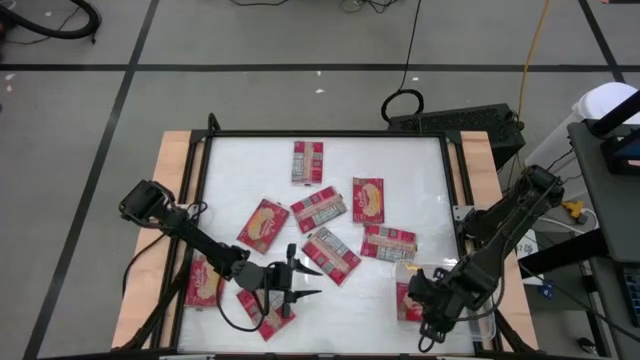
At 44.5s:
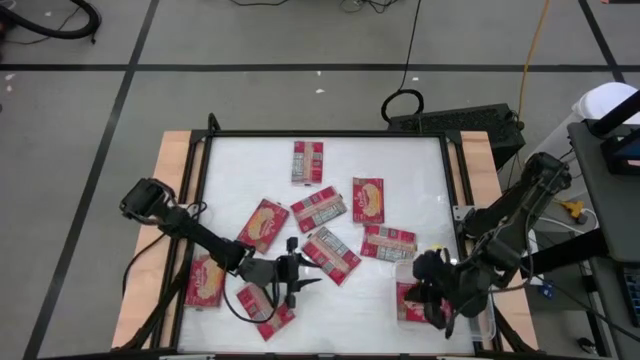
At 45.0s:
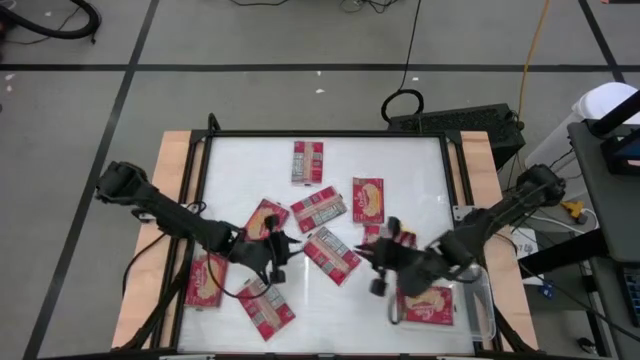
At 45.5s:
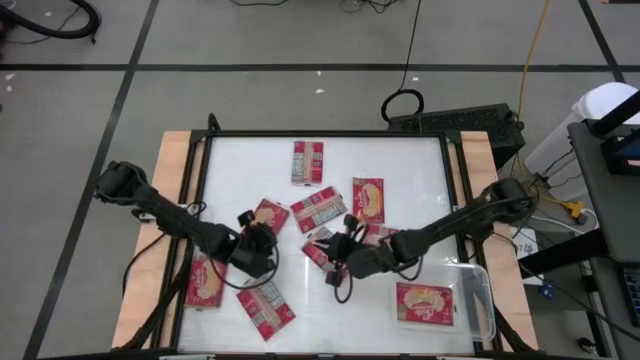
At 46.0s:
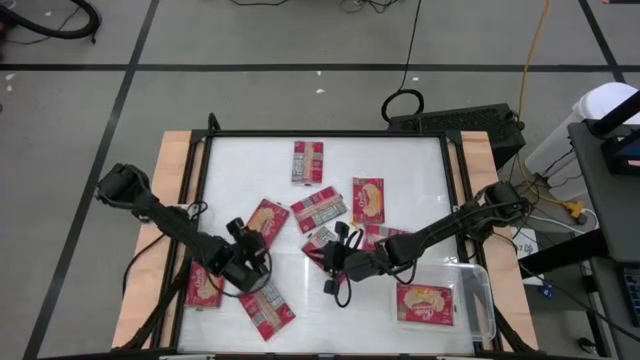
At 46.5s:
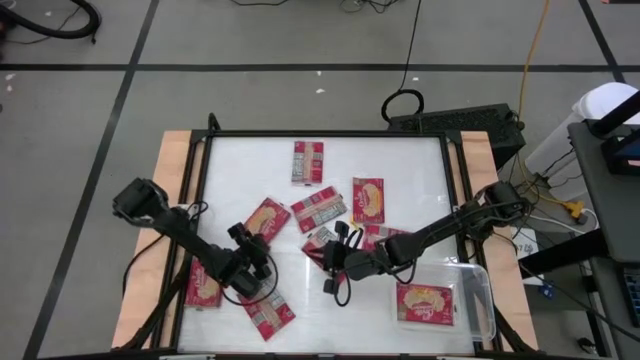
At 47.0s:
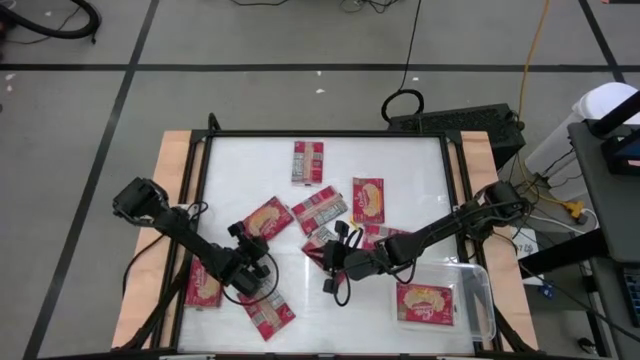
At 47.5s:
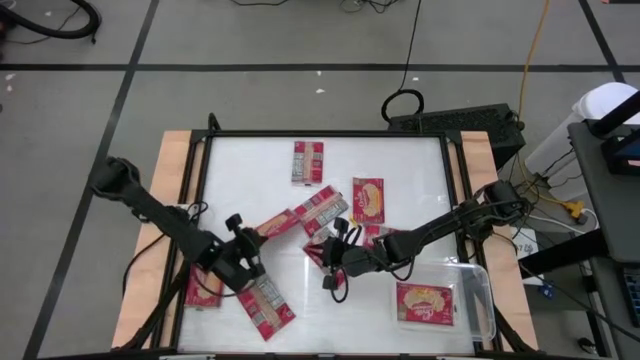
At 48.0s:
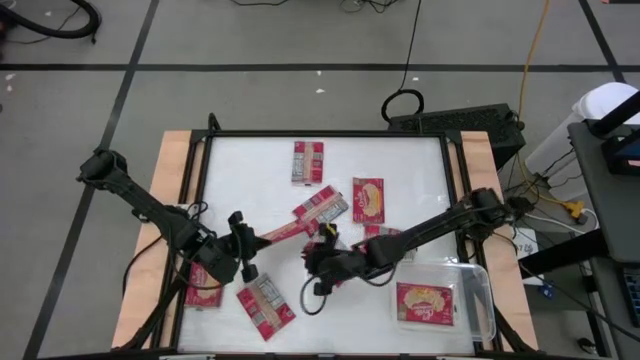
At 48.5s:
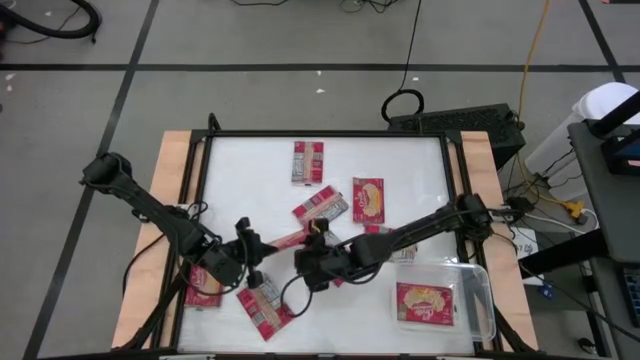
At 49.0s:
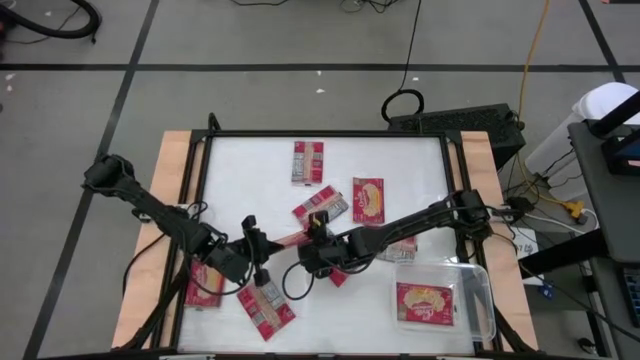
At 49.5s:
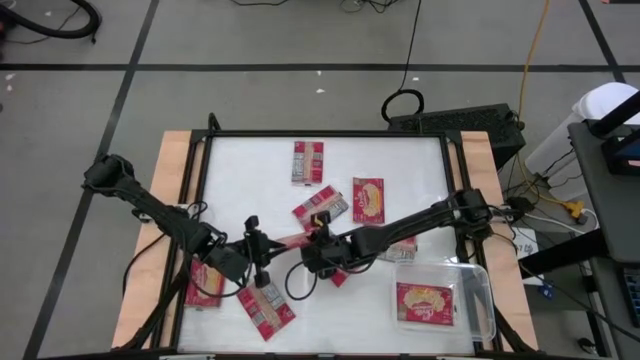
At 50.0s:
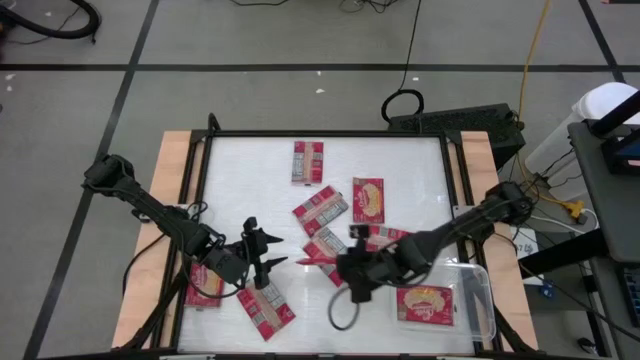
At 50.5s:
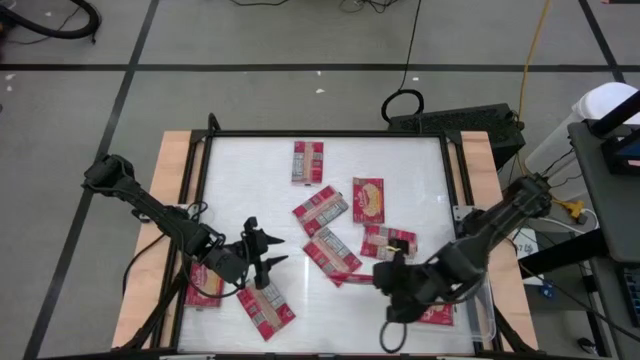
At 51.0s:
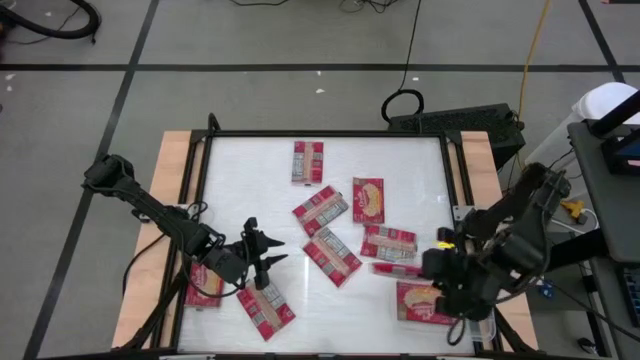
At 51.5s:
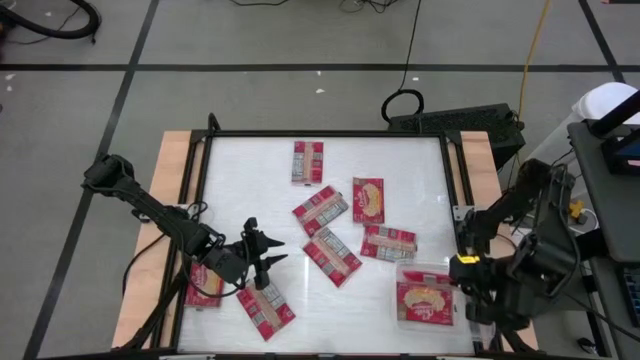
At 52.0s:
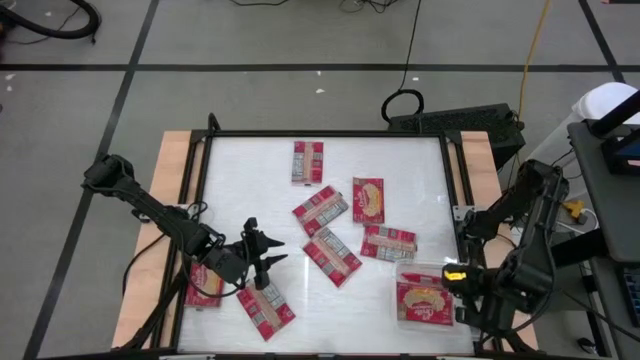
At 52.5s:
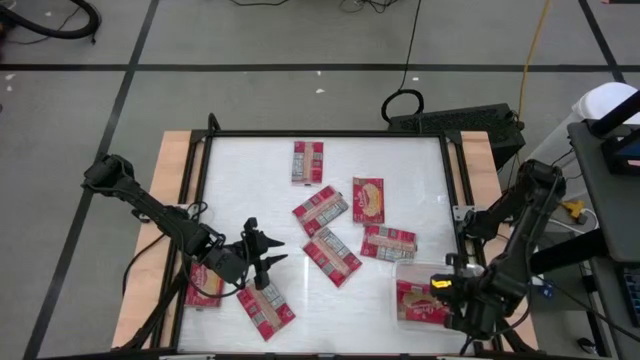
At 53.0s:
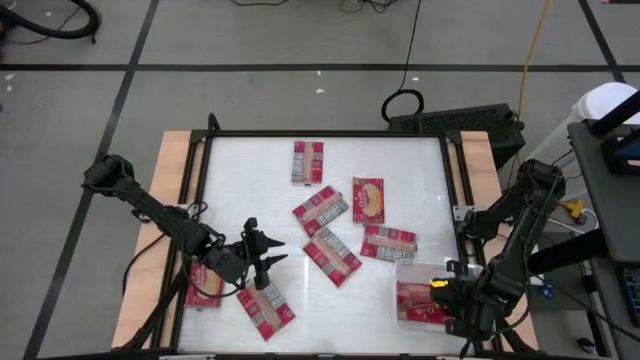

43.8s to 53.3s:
Task: Sort popcorn bags into baskets
Put the red popcorn pack into the transparent bin

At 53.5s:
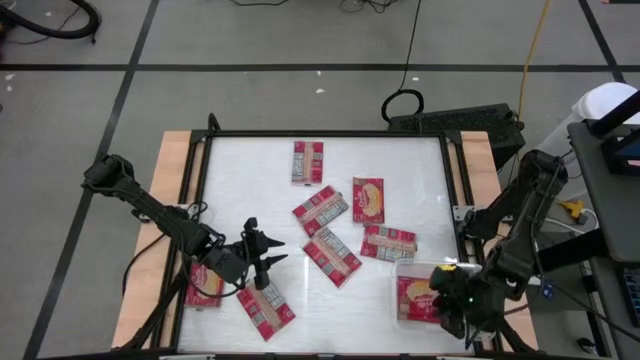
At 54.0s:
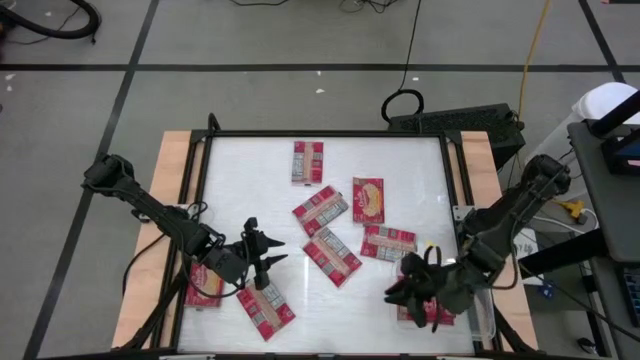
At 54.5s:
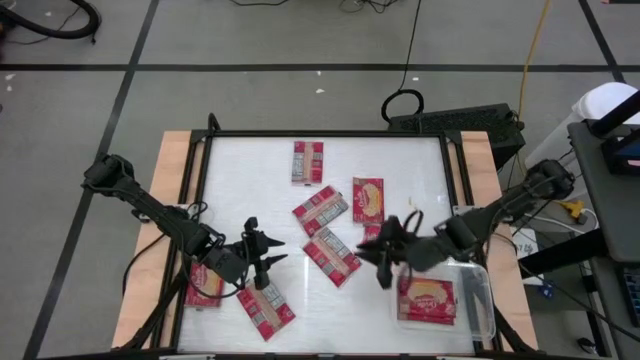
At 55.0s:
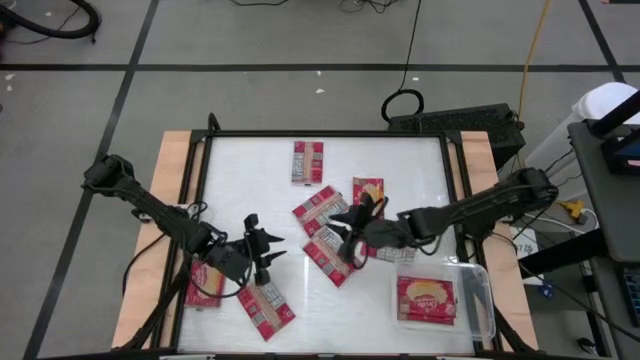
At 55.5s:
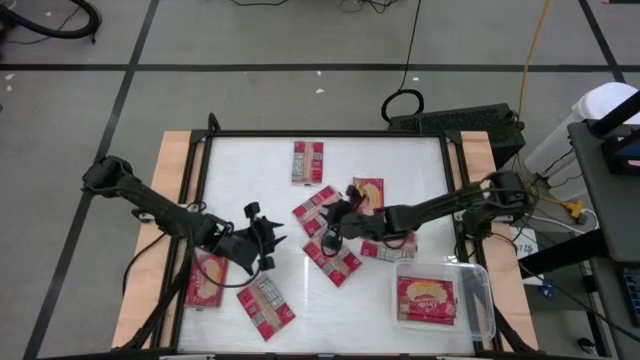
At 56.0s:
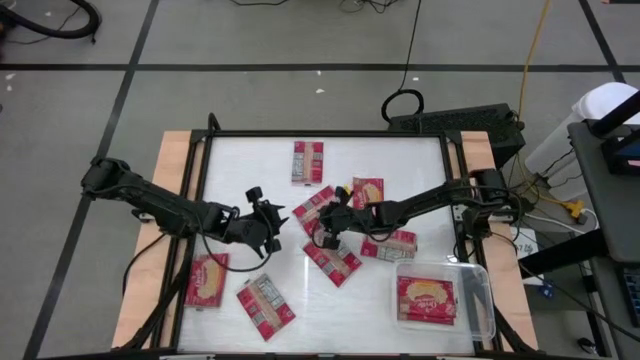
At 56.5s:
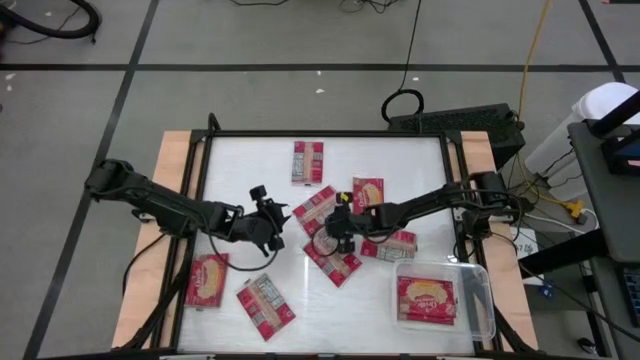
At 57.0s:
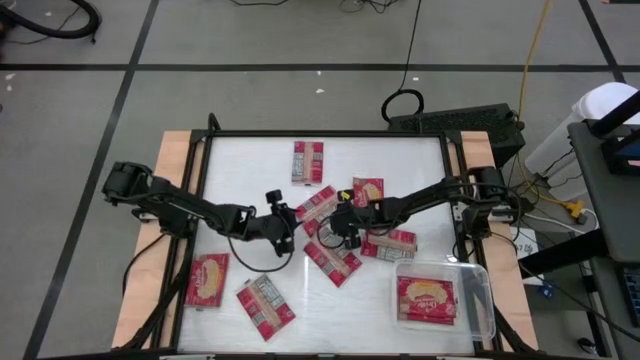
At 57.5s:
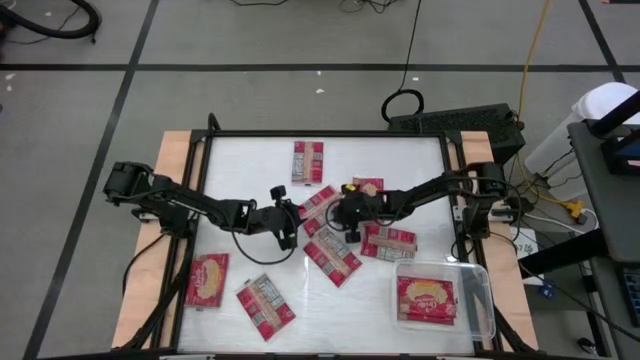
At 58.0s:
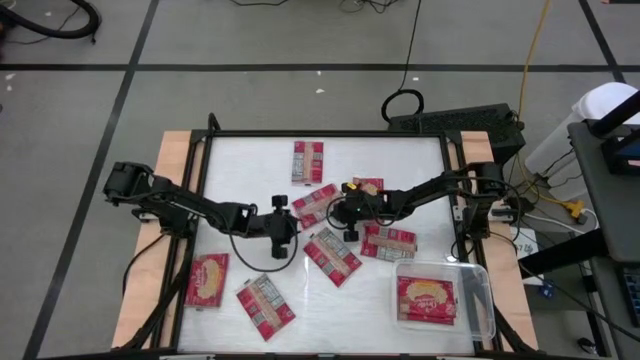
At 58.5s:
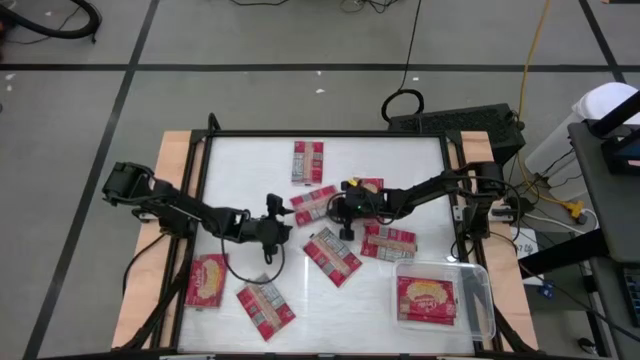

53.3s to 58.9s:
Put the red popcorn pack into the transparent bin

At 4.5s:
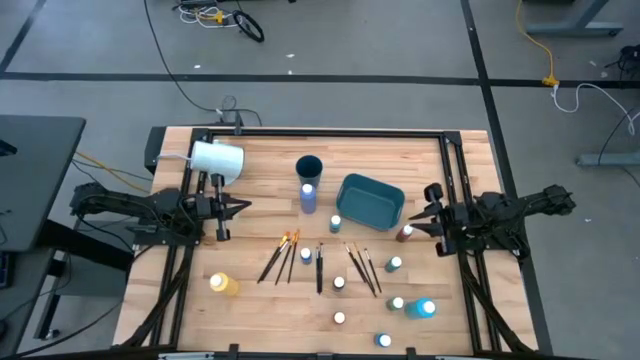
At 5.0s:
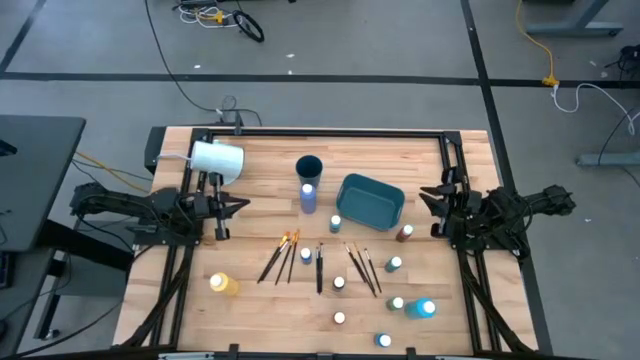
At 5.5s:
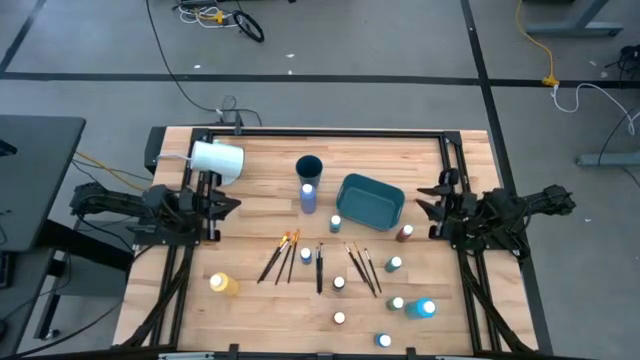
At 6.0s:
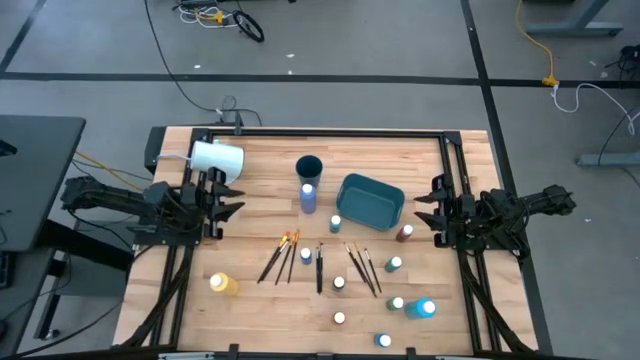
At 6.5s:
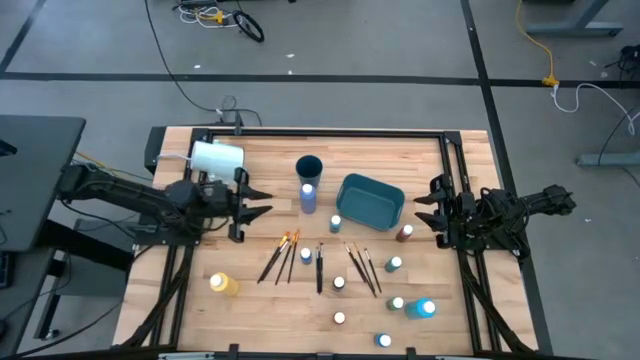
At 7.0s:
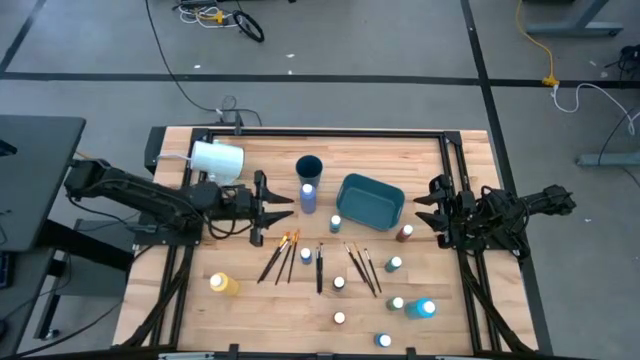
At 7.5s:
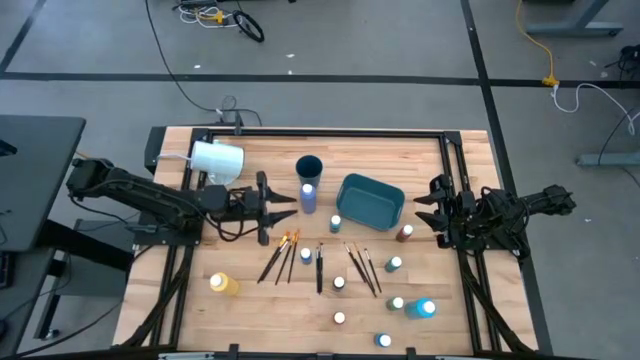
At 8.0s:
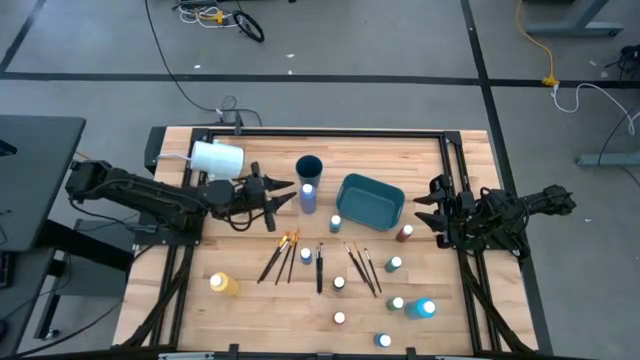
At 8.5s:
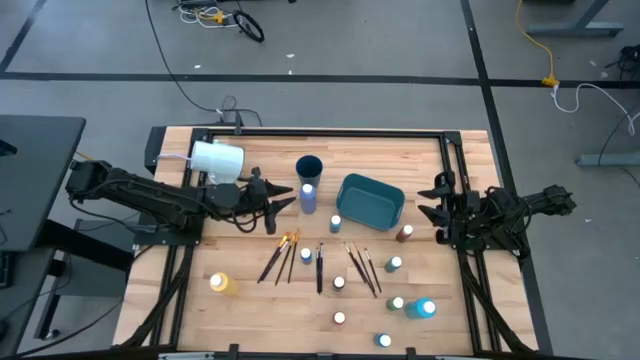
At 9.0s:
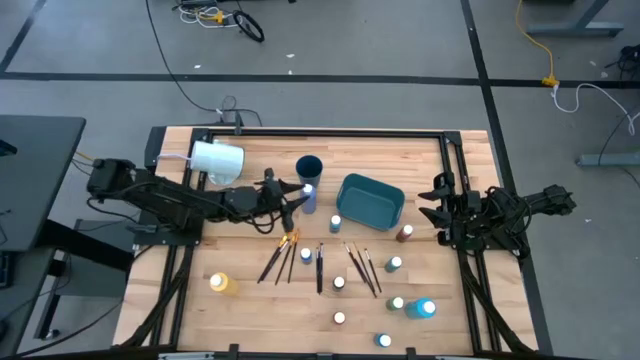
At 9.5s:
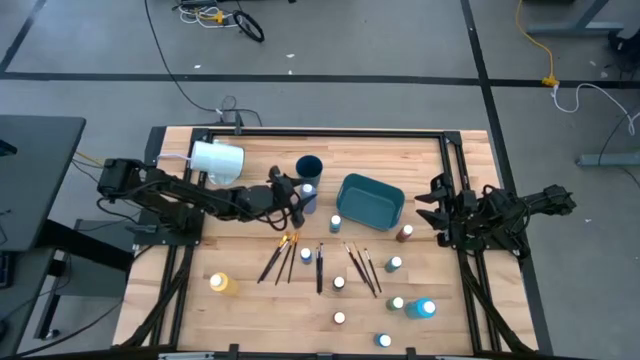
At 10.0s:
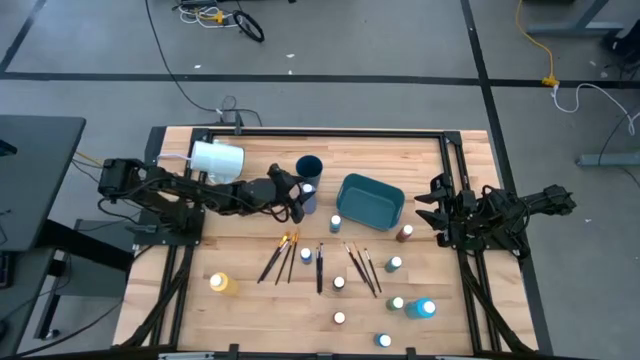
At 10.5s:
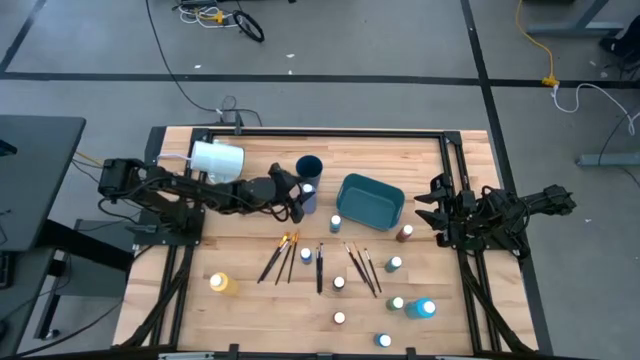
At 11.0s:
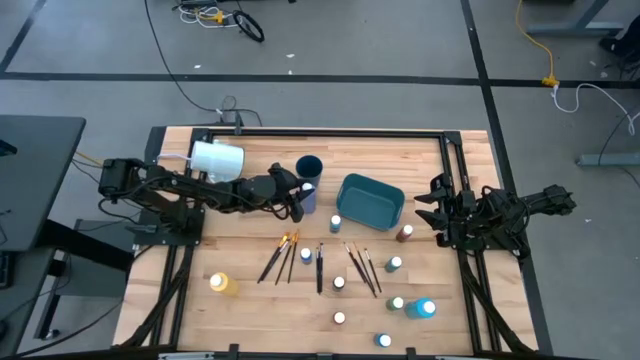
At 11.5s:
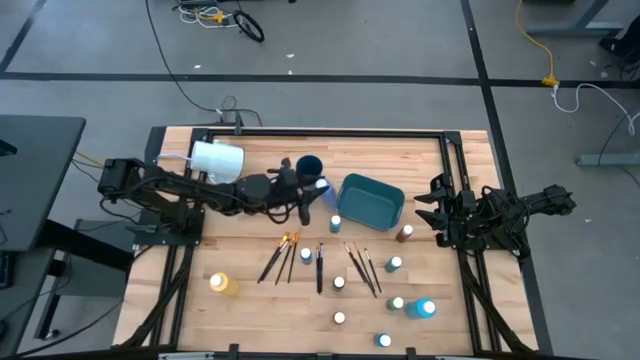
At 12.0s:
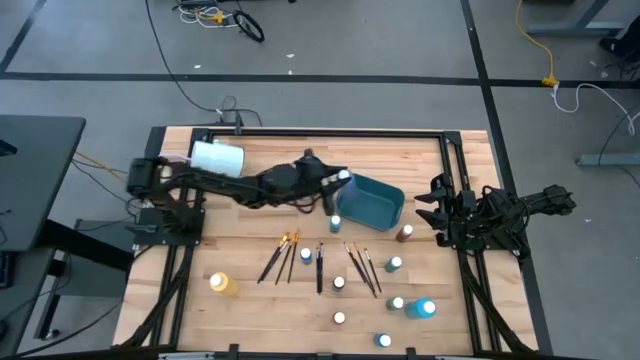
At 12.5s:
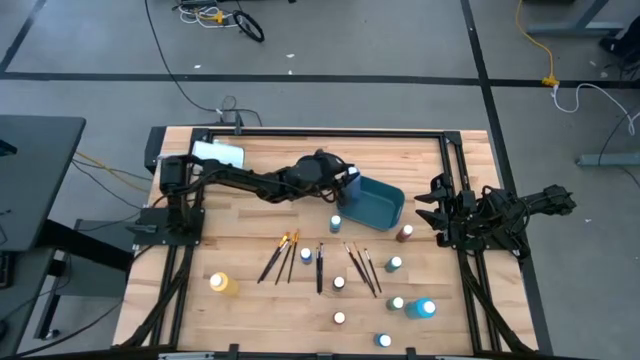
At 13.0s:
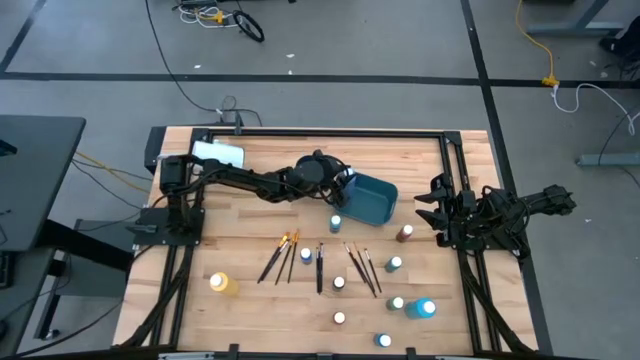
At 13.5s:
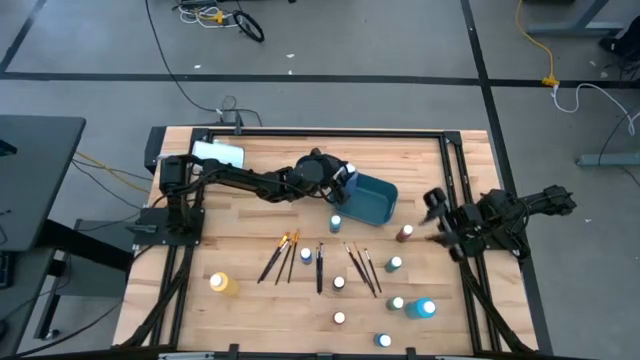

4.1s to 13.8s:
Task: Pick & Place Paint Supplies
Put the large blue paint bottle into the blue bin
